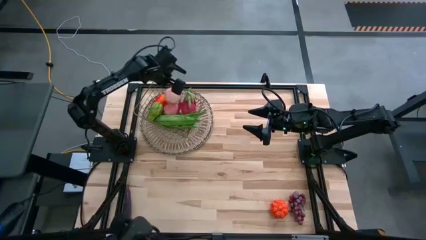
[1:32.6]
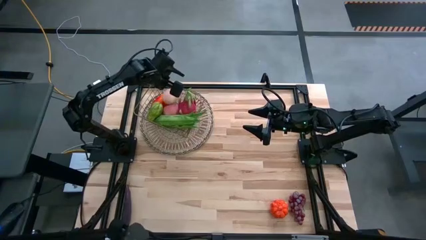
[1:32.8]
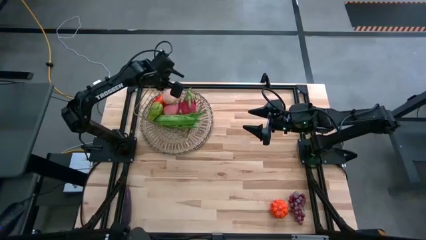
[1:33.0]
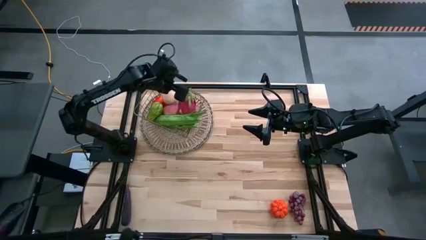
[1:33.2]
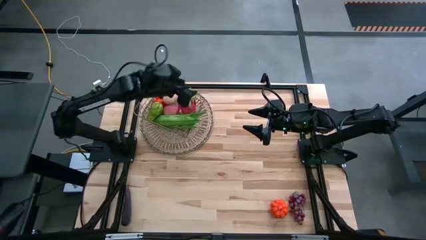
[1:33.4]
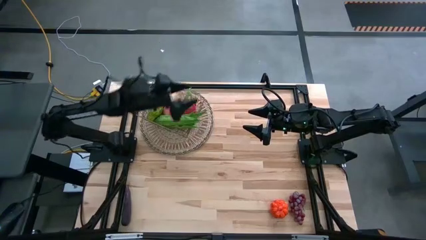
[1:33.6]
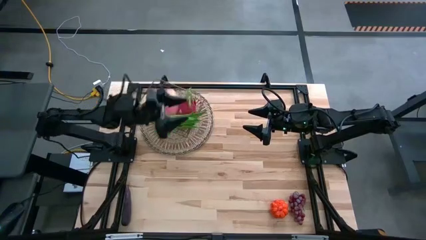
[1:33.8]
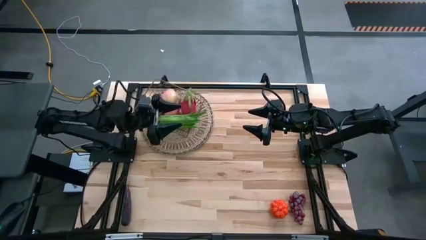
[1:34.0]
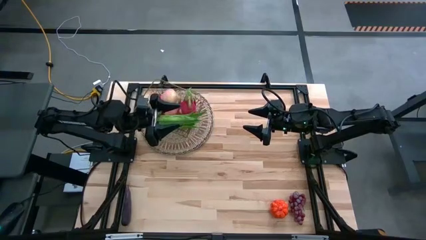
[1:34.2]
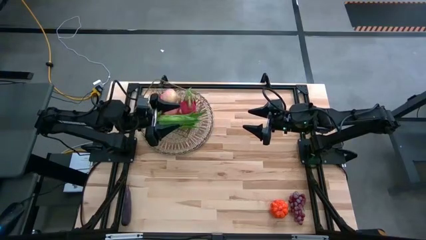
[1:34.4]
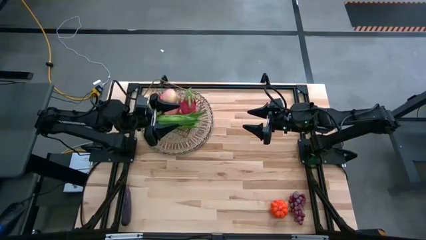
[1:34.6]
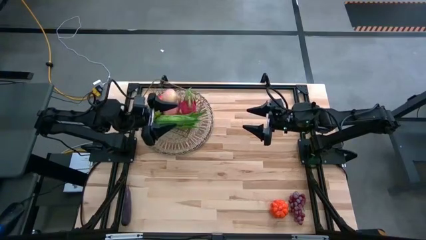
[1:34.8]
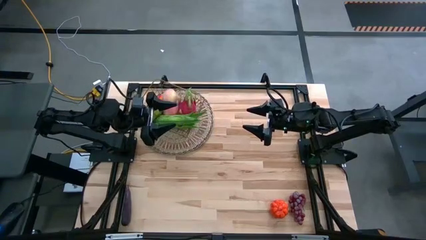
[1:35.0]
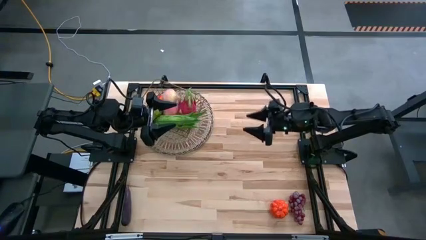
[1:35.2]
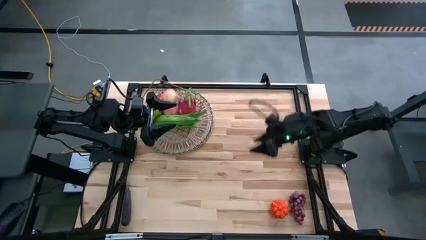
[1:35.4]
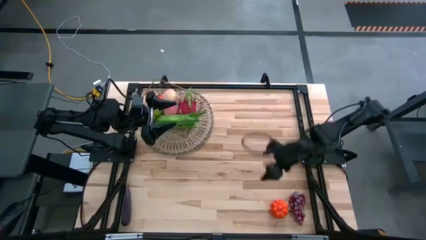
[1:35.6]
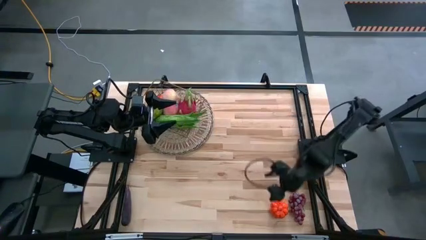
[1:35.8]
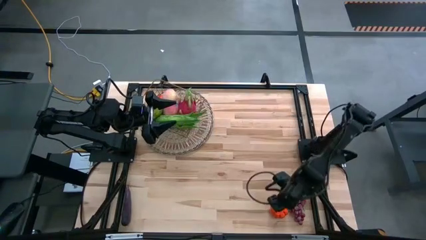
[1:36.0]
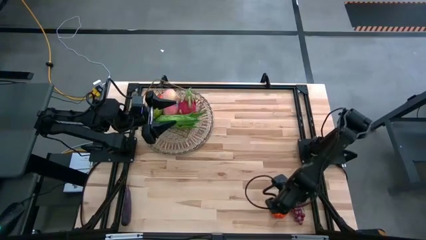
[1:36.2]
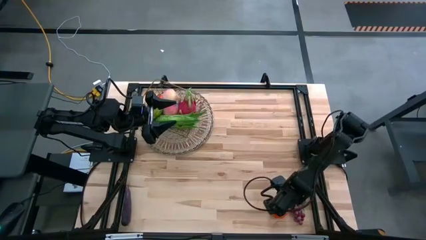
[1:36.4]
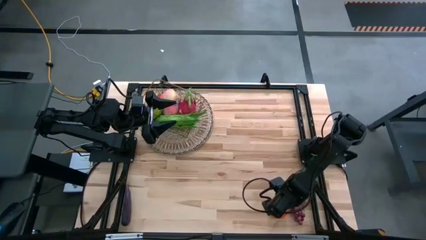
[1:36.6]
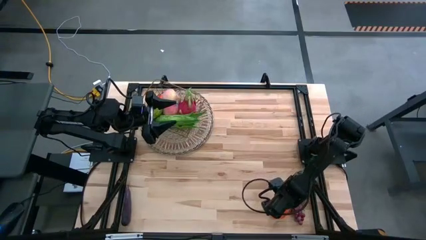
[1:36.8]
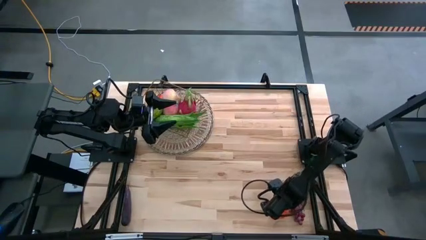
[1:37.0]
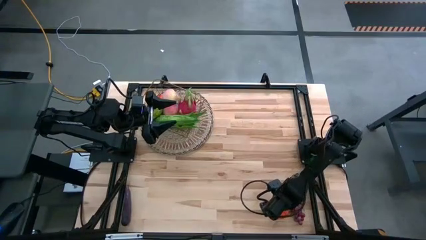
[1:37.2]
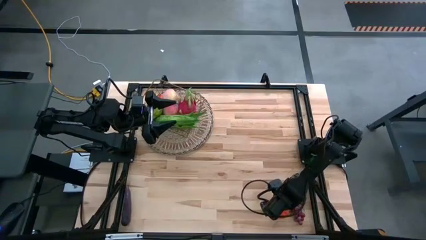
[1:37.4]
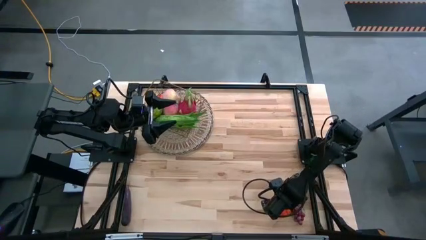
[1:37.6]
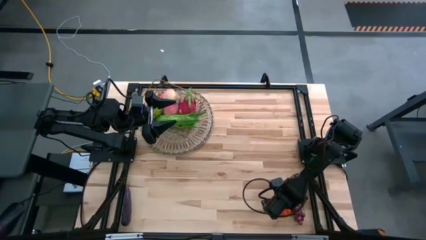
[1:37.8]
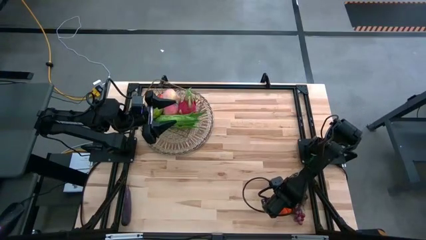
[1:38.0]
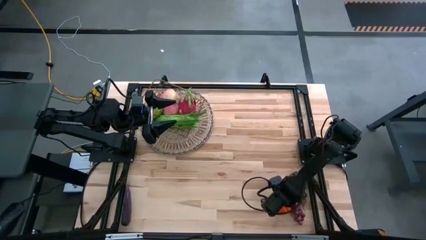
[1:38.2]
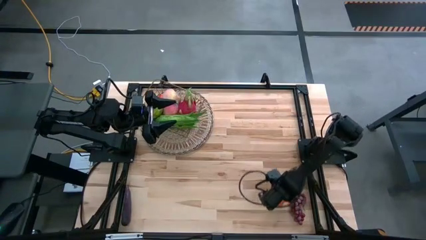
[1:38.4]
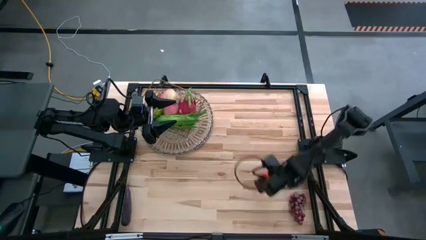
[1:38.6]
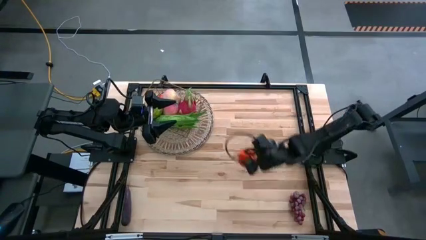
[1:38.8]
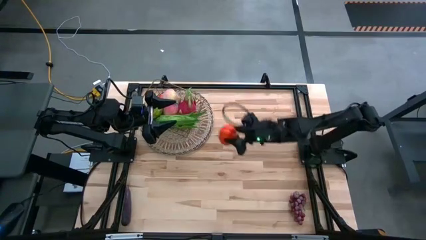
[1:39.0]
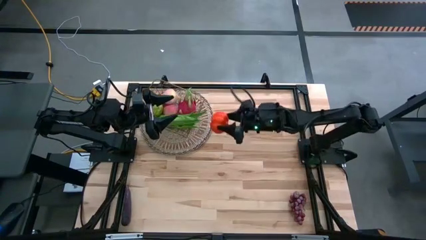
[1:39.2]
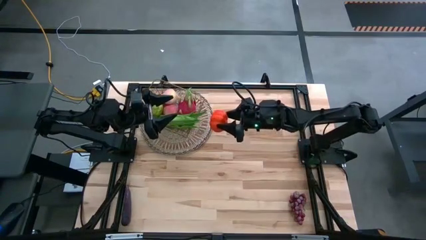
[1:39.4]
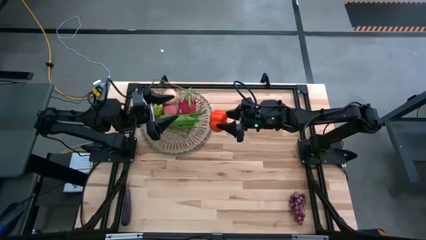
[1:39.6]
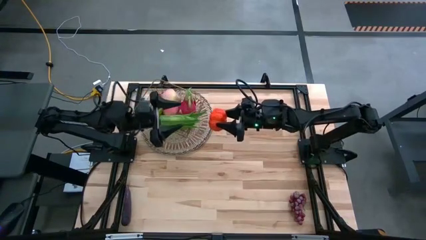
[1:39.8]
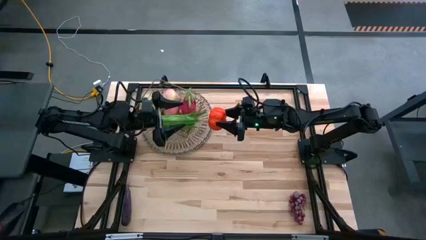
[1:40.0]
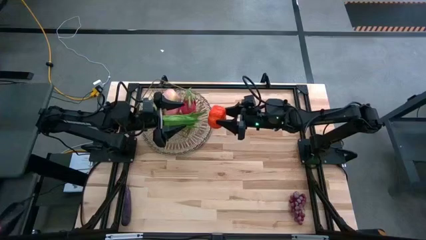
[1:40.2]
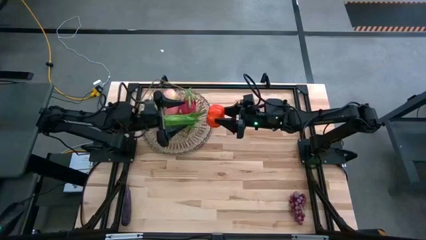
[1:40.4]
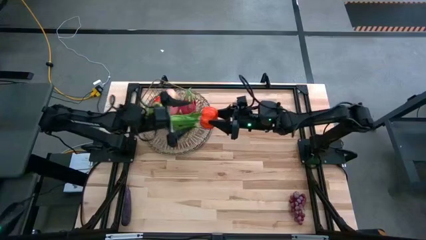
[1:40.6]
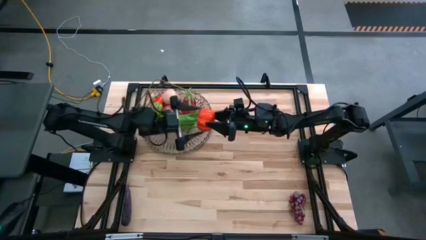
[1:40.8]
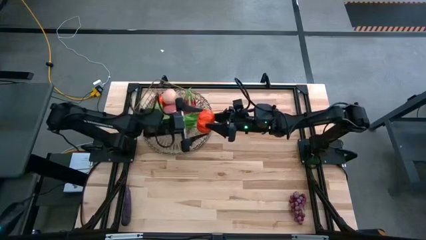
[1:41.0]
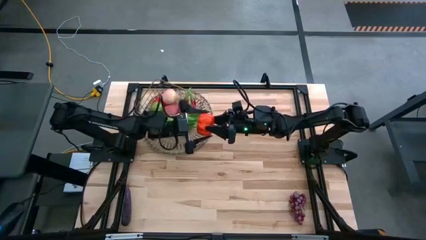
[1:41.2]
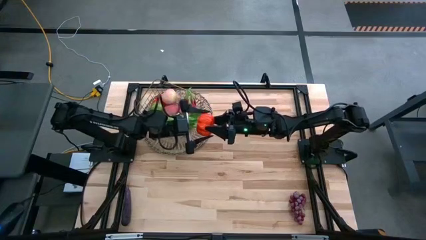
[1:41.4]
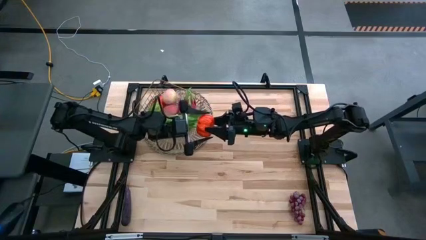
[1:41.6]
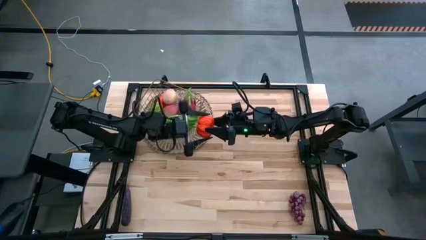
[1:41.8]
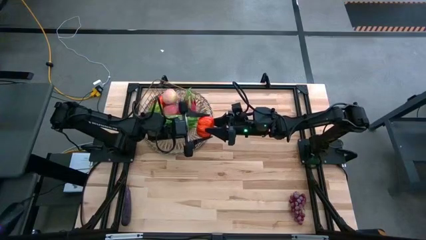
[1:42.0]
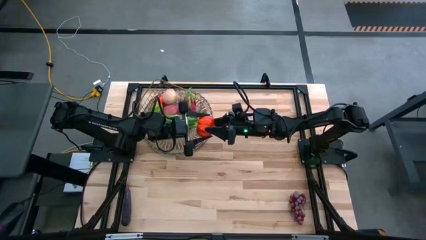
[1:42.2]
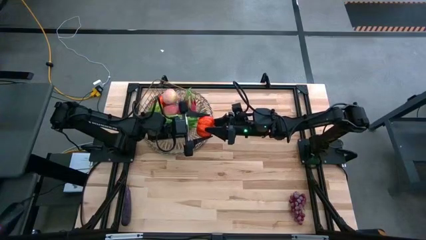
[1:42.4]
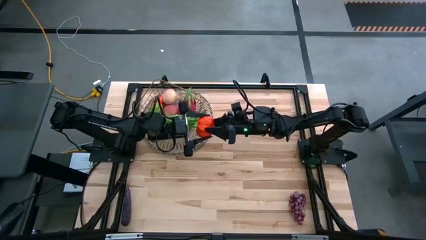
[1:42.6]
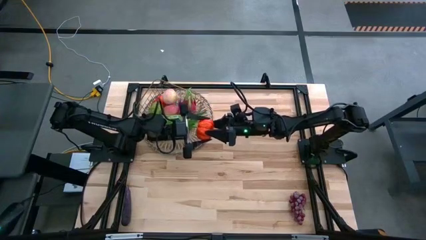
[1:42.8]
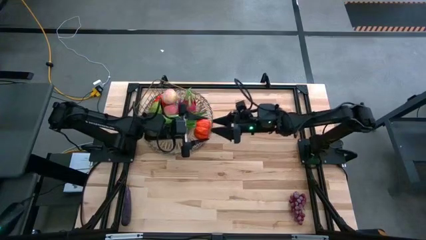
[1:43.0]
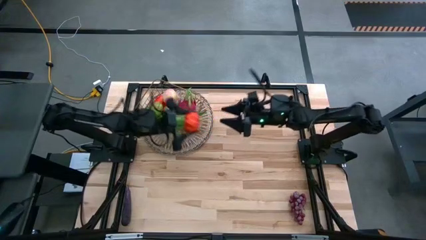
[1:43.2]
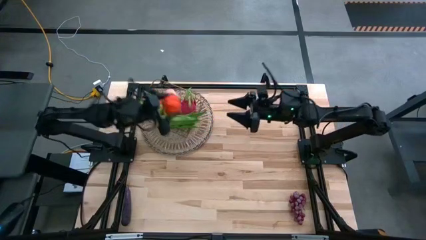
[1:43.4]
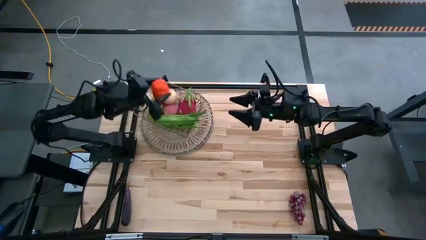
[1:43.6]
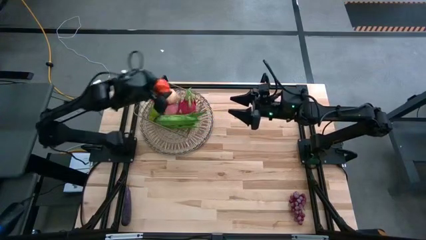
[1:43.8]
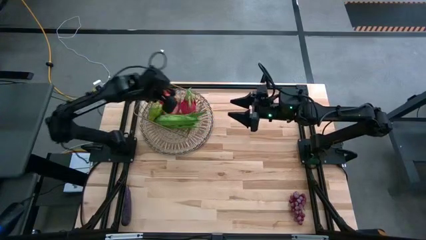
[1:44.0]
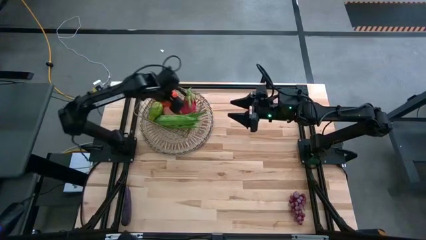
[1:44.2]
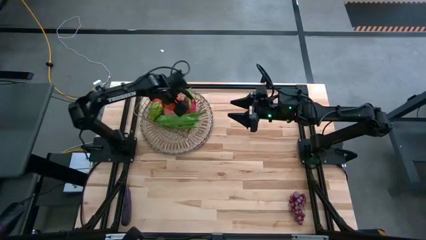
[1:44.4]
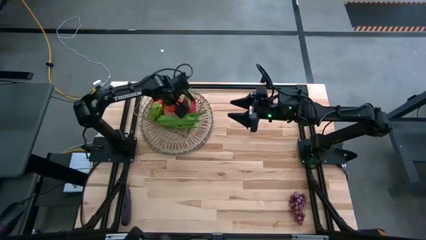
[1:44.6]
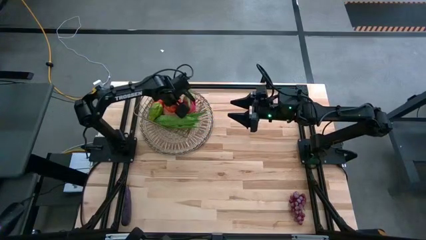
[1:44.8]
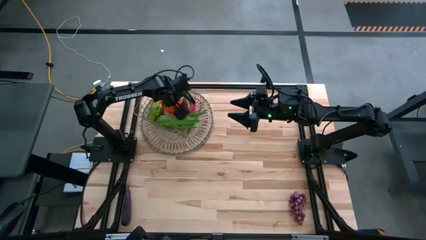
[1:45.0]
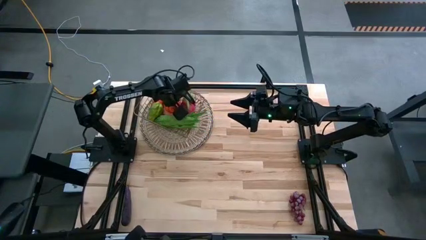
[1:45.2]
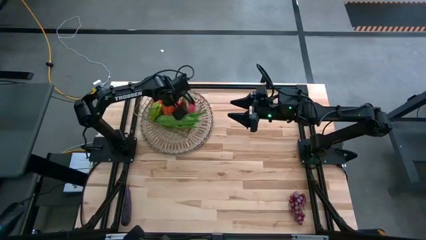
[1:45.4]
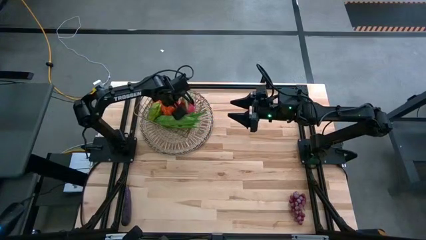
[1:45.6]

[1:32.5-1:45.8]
Task: Build produce basket
Put the pumpkin into the wire basket

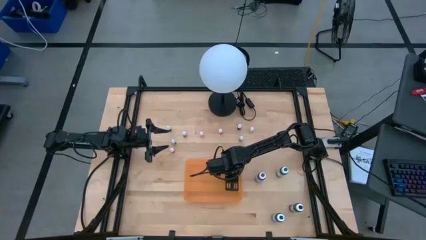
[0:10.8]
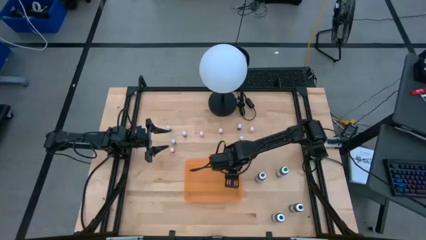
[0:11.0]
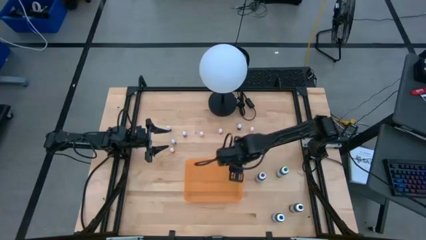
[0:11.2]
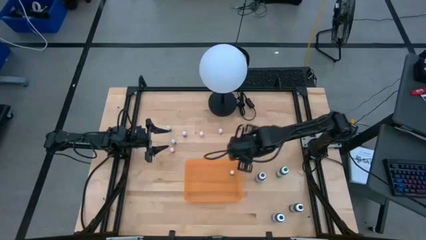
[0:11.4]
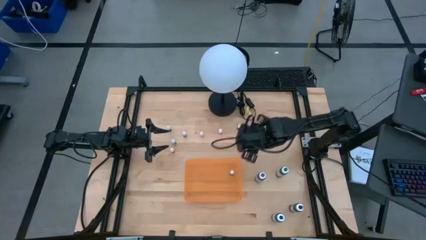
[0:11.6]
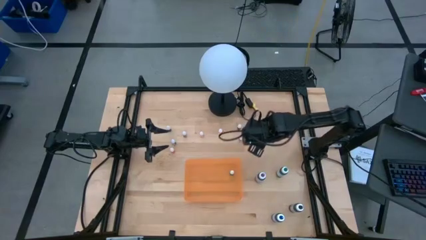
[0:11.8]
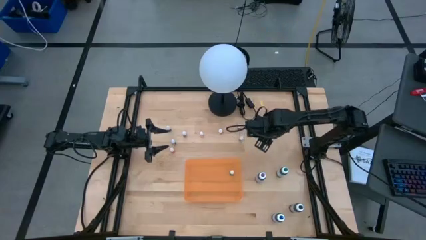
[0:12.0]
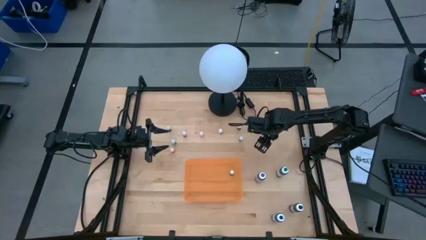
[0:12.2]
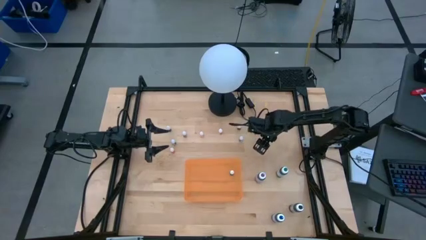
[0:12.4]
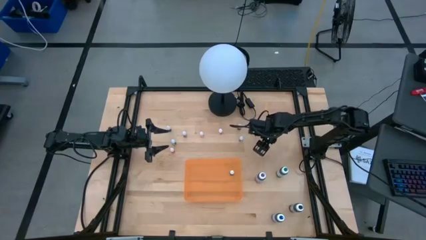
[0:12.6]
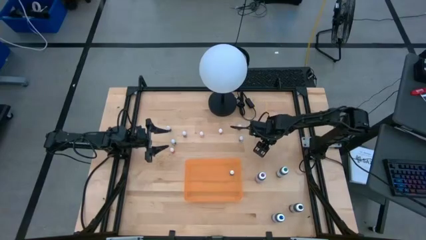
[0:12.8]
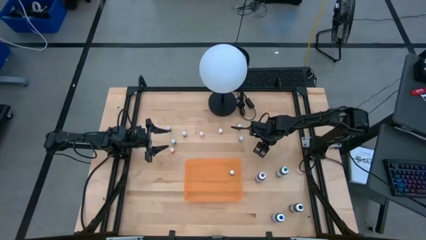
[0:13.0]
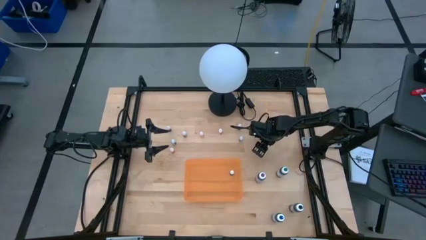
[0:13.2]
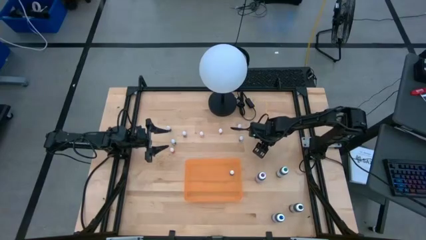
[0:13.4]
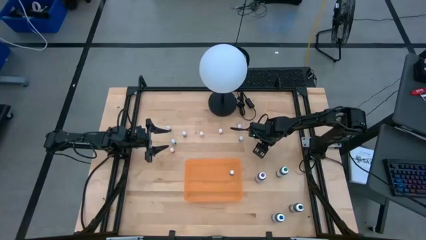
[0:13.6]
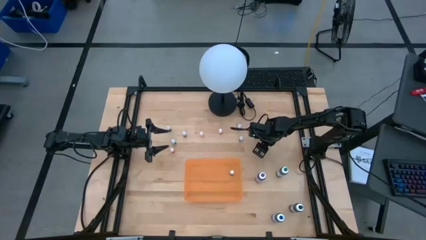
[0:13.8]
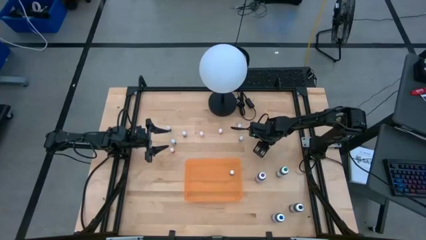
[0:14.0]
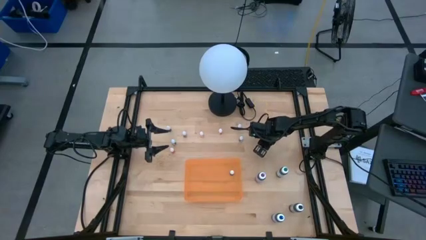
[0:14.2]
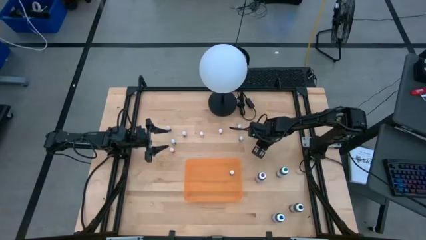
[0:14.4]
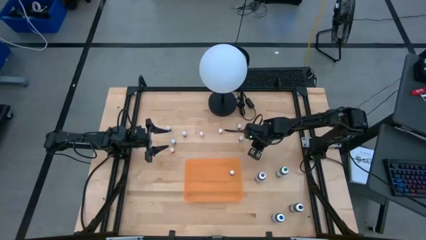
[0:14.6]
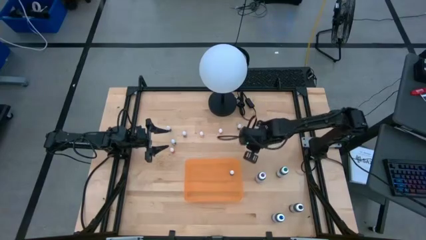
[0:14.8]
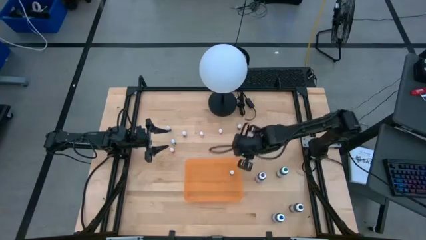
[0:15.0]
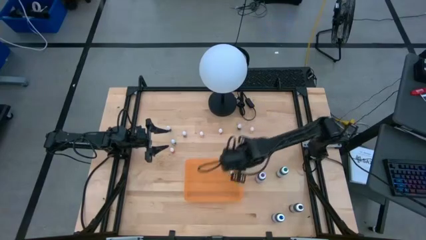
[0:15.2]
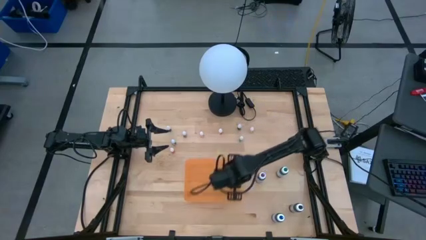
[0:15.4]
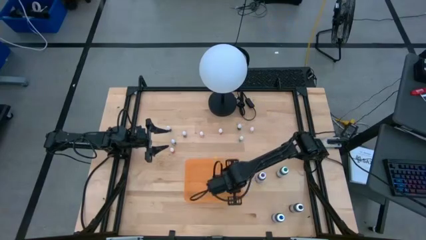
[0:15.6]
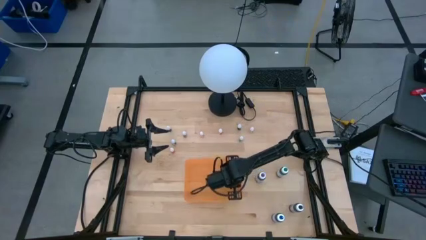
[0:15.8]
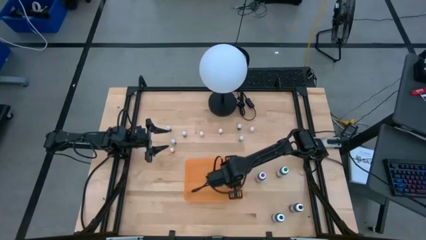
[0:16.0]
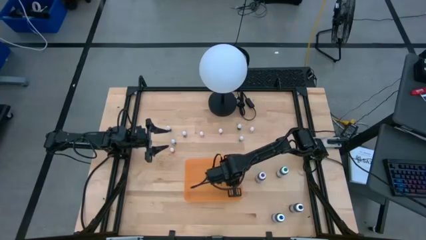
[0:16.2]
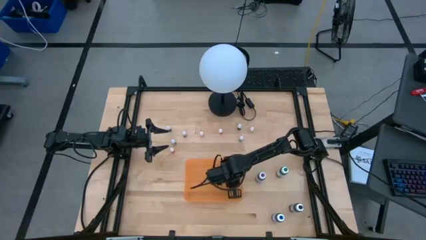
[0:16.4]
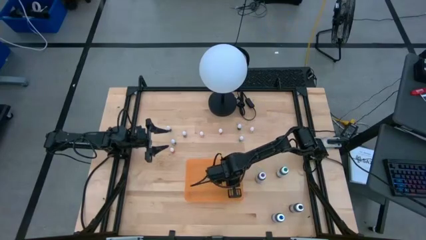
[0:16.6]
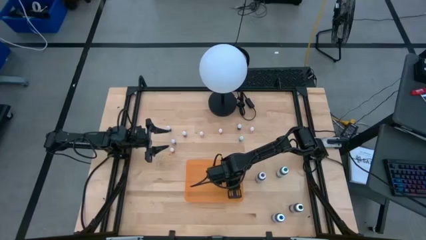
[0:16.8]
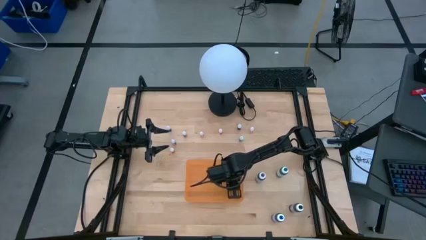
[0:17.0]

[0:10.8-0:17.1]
Task: Pick & Place food coloring
Put the small purple food coloring bottle into the orange container
